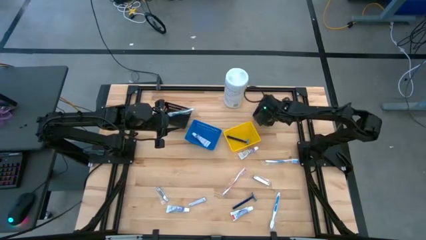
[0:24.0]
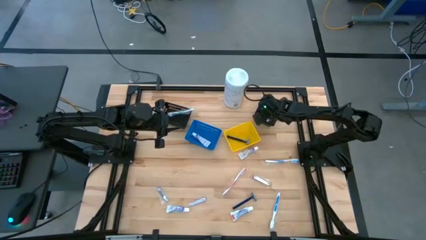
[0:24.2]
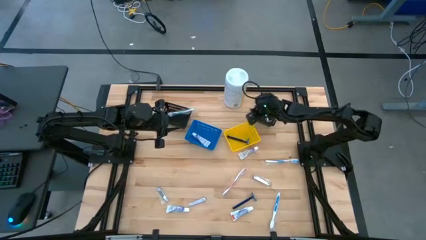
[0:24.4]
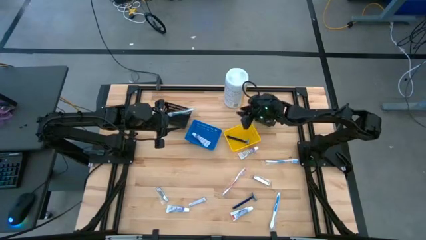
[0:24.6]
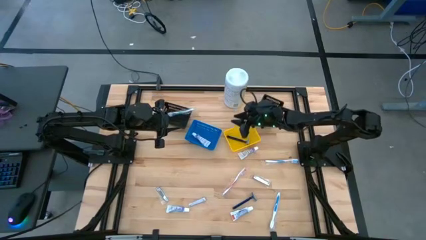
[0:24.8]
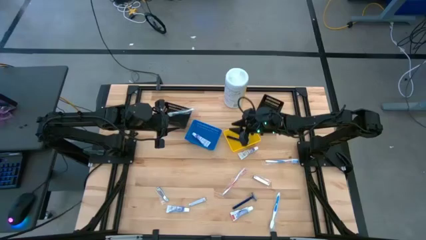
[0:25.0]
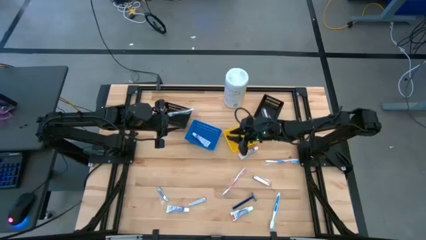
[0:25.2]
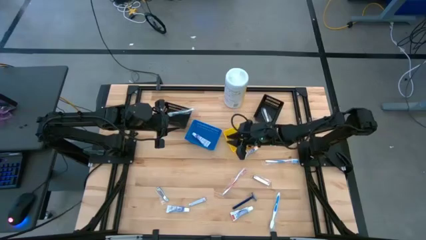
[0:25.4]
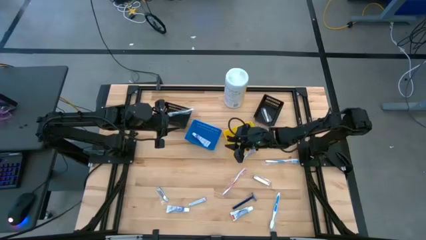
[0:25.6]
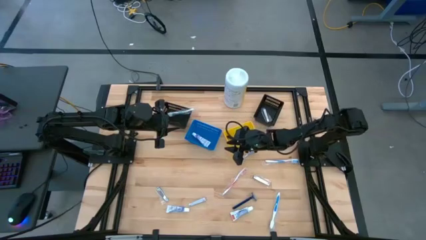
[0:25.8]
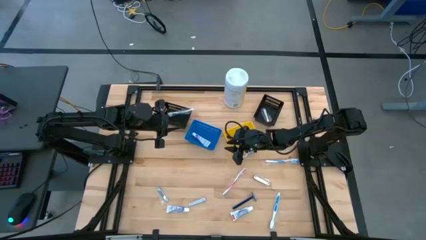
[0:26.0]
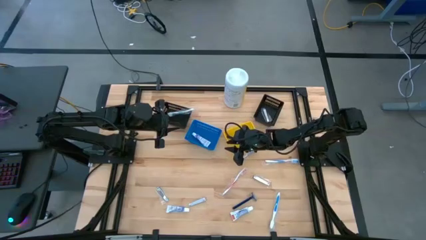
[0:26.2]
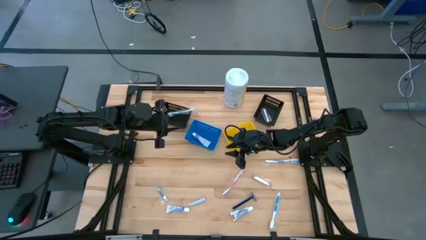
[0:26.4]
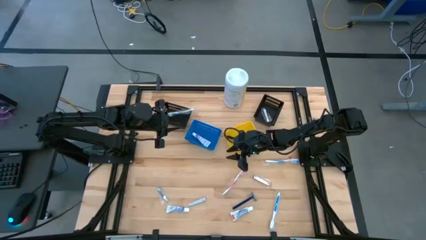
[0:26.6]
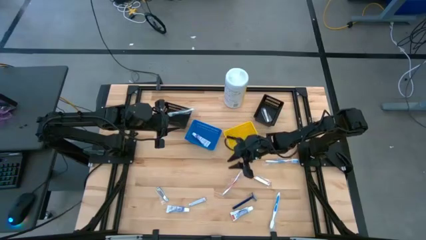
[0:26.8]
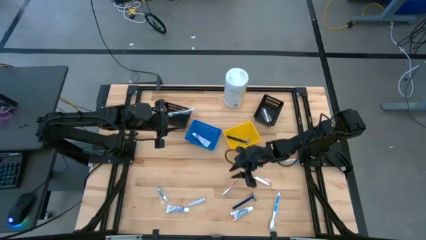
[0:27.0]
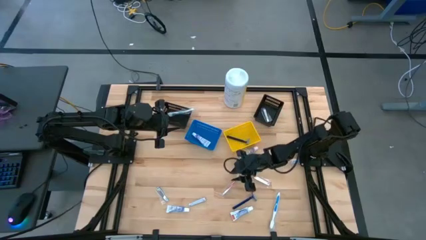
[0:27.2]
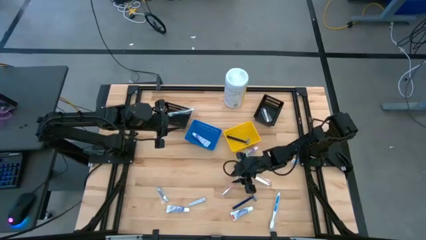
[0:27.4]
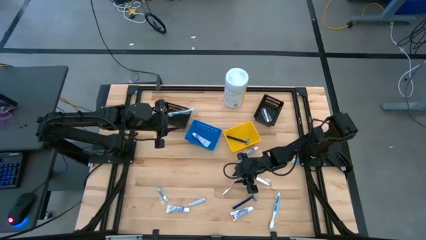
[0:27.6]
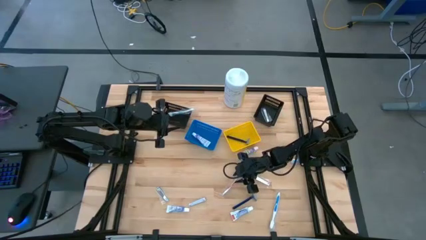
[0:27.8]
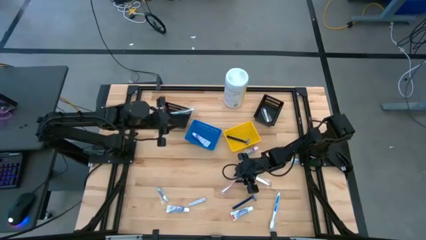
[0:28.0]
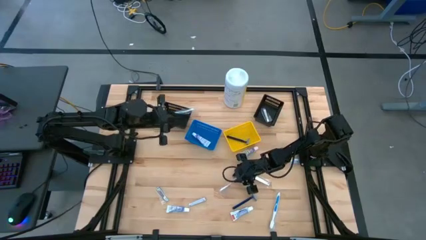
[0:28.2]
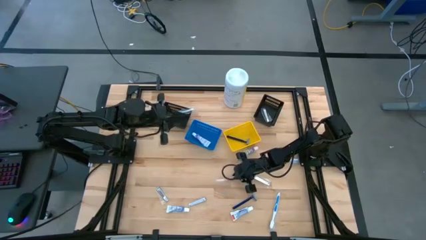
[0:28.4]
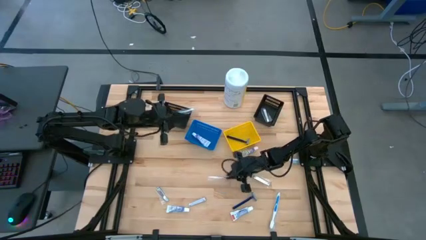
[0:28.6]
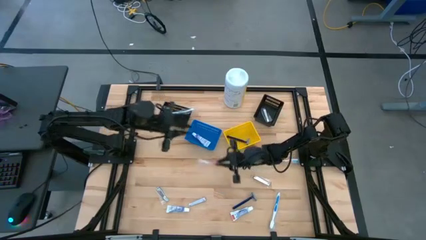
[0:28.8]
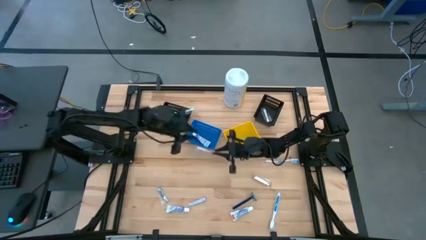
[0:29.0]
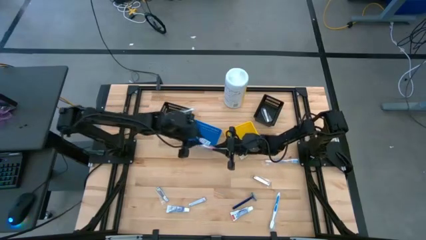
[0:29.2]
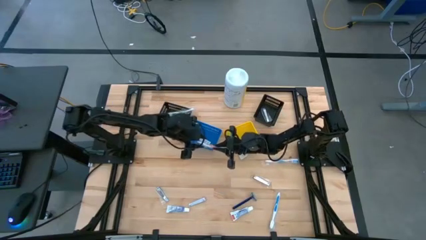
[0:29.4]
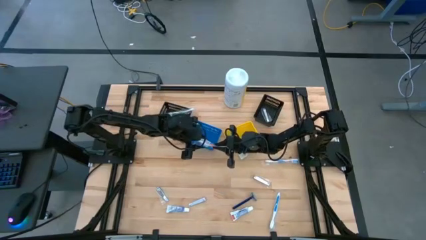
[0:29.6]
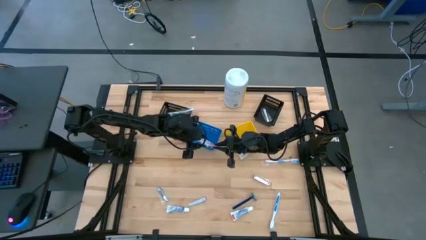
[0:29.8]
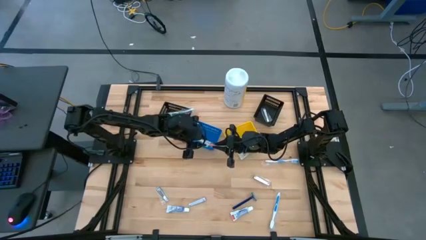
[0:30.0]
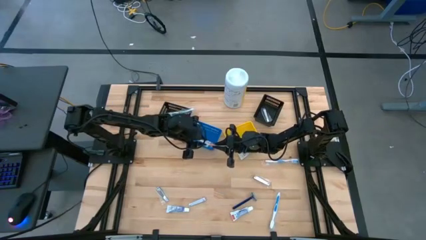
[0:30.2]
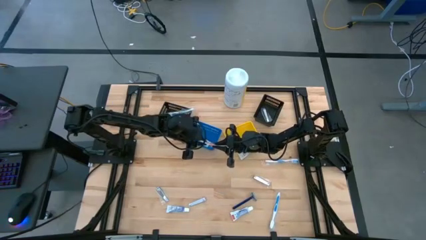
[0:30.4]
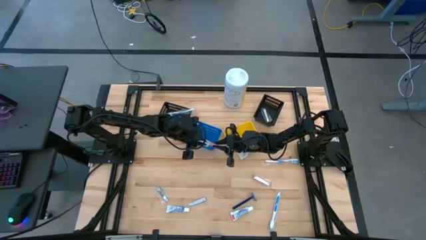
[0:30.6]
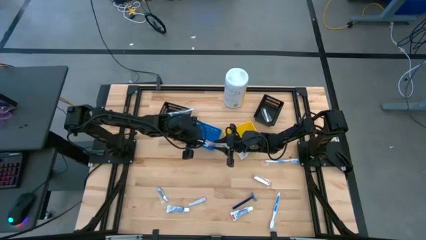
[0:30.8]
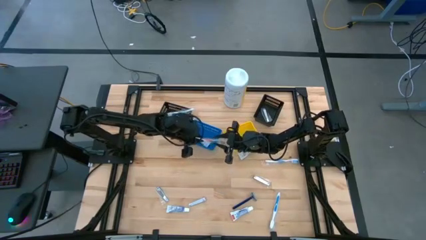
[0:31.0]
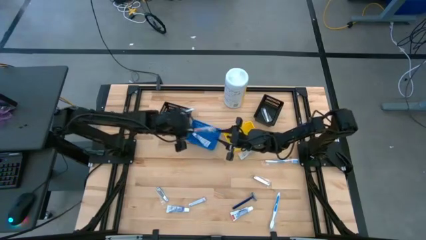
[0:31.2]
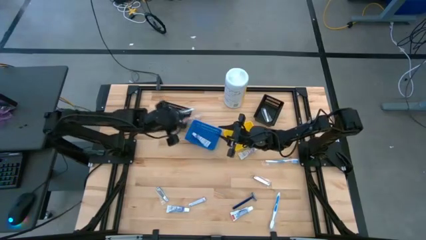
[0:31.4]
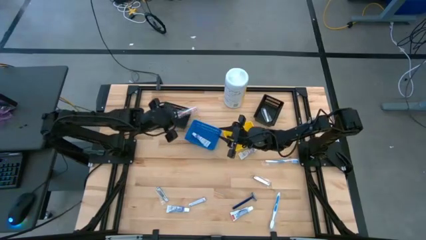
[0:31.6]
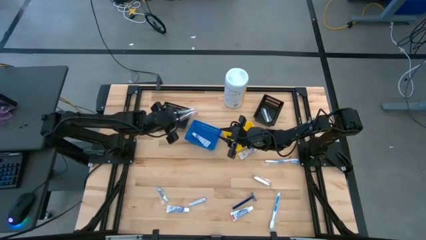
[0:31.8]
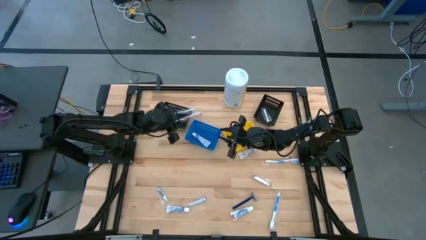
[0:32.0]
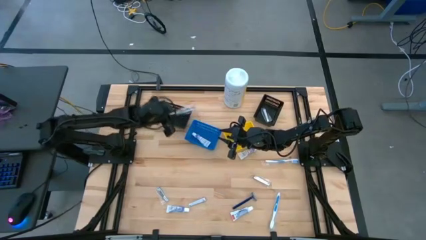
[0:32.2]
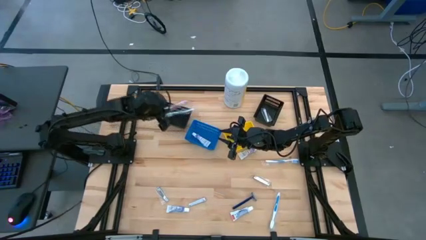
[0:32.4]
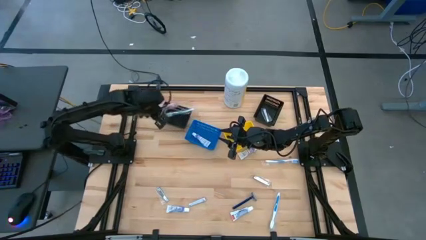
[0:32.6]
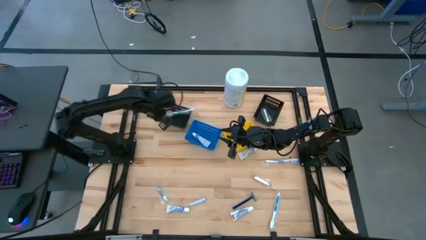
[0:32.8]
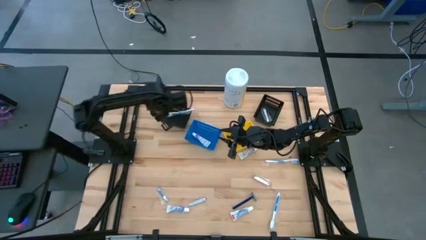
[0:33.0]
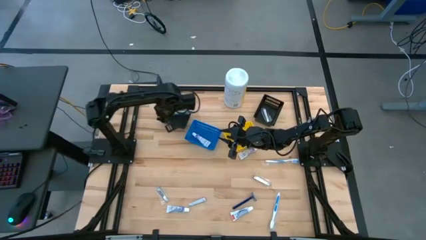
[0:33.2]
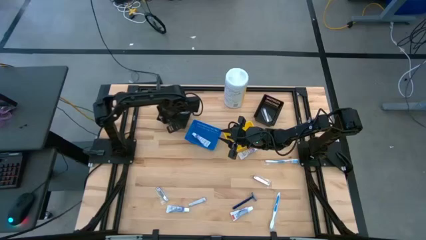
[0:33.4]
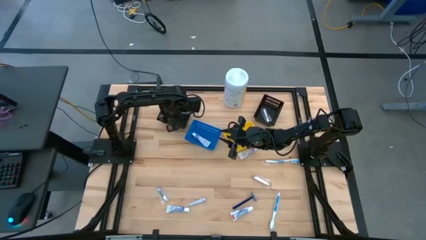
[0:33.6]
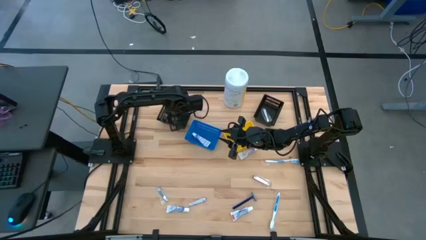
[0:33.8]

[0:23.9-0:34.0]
Task: Pick & Place Travel size toiletries
Put the orange toothbrush into the left black bin

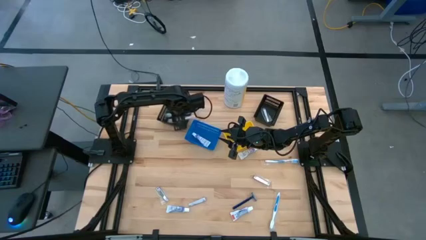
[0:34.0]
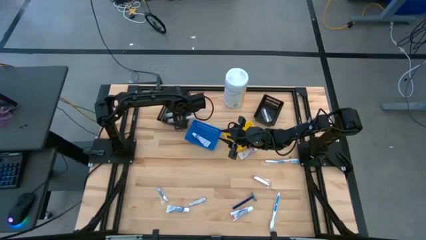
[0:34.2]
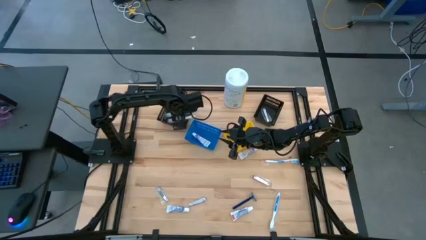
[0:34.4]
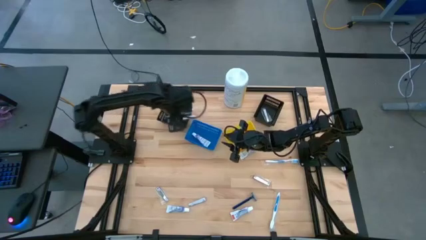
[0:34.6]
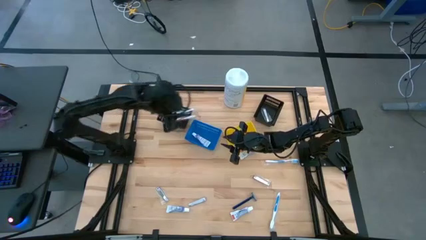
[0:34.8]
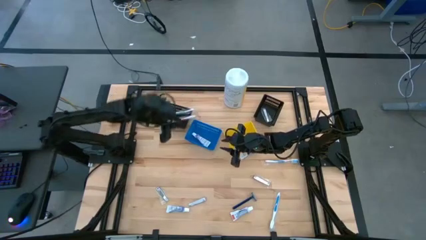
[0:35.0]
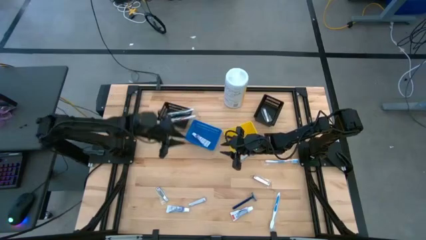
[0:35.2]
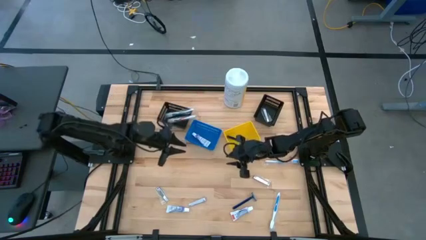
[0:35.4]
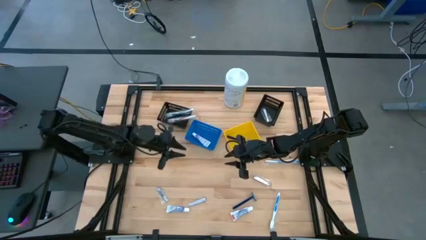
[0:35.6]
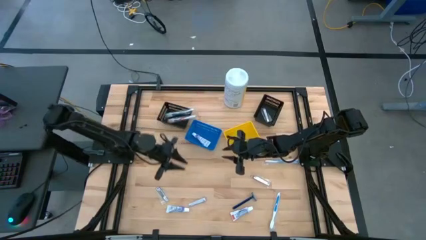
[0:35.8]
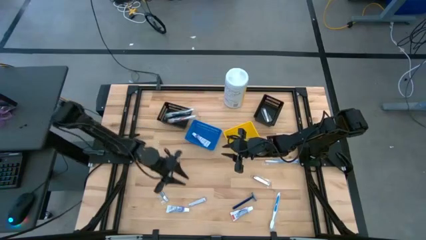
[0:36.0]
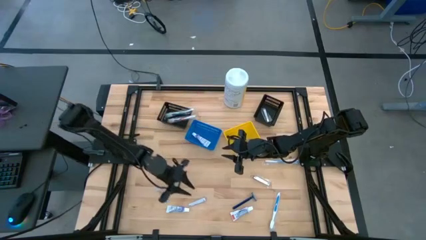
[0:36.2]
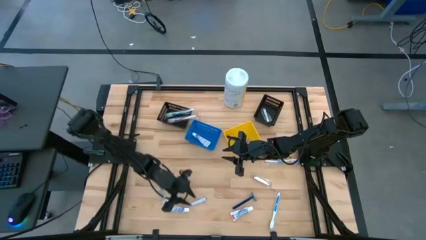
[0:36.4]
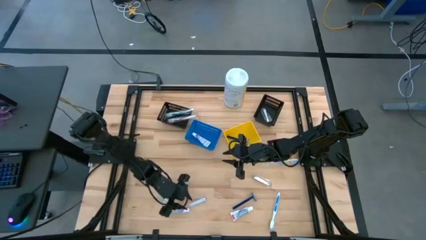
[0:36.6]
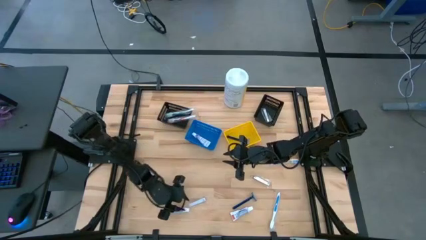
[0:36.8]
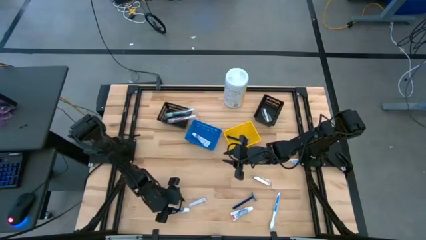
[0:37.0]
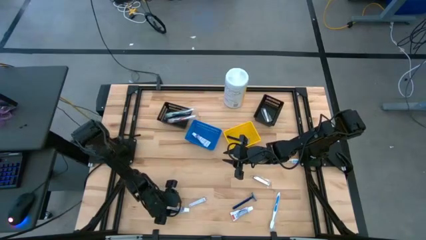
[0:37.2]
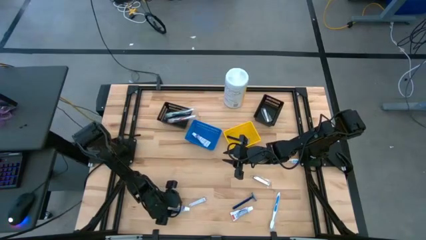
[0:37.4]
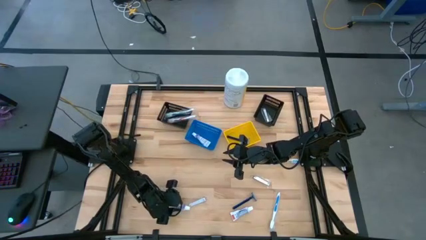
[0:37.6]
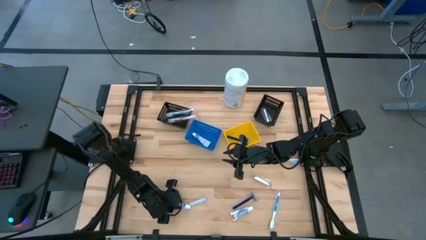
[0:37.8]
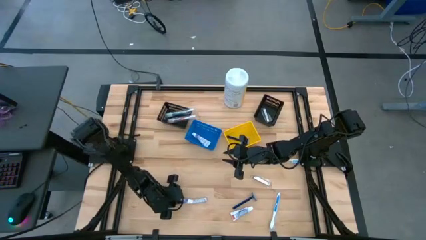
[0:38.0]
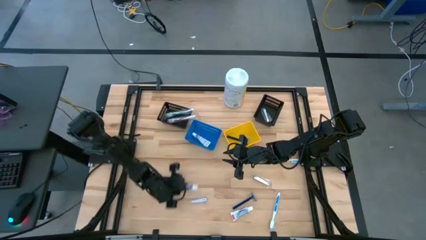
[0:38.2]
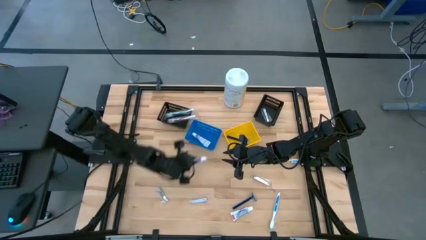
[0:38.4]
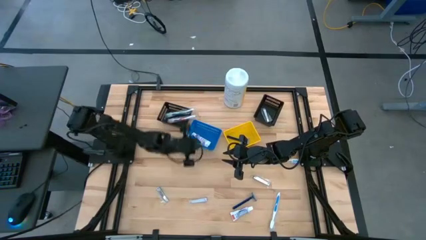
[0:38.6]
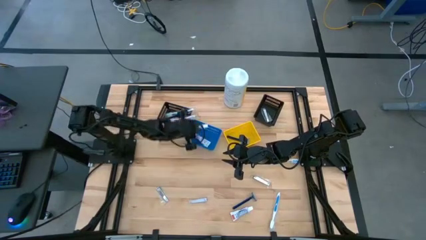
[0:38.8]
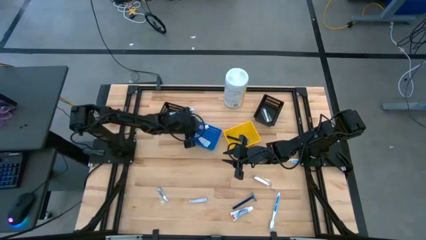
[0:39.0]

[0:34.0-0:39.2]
Put the white toothpaste into the blue bin

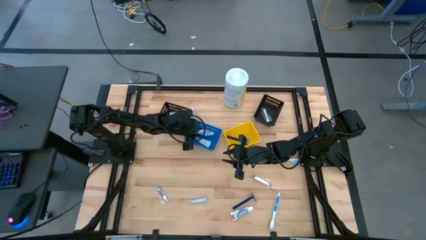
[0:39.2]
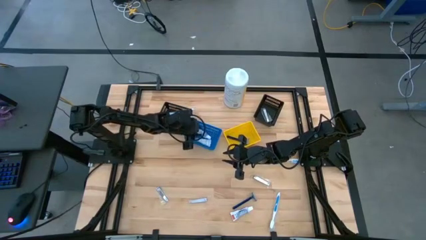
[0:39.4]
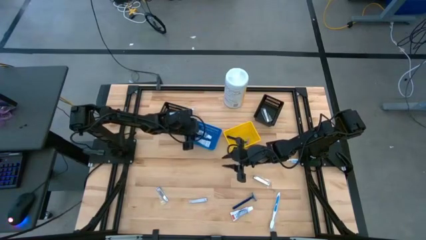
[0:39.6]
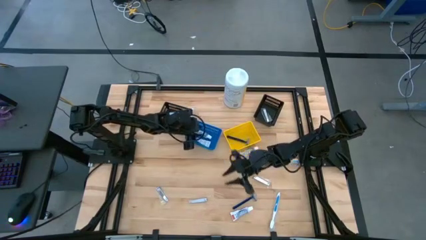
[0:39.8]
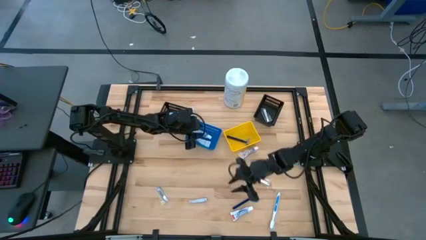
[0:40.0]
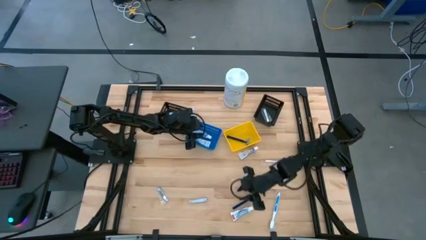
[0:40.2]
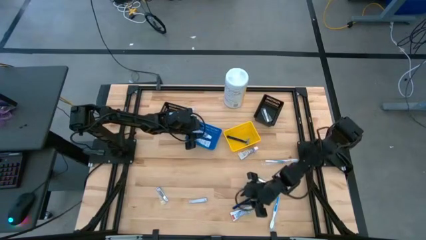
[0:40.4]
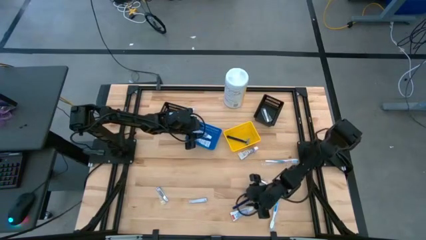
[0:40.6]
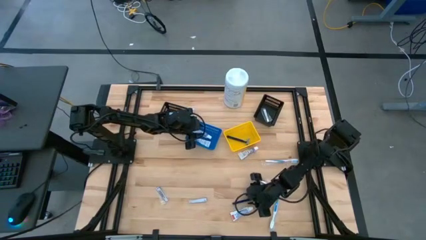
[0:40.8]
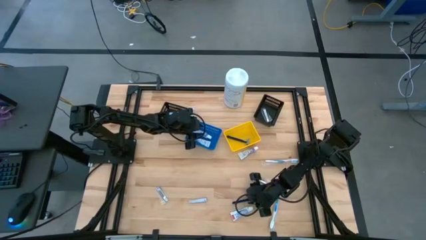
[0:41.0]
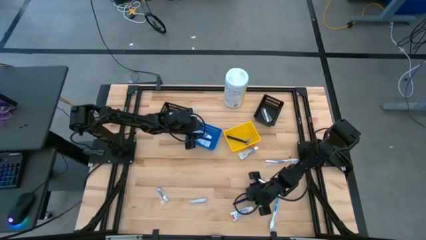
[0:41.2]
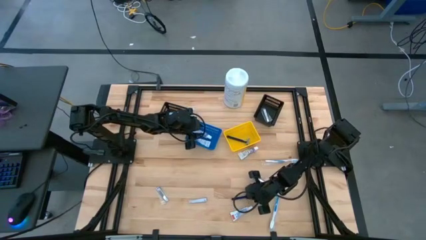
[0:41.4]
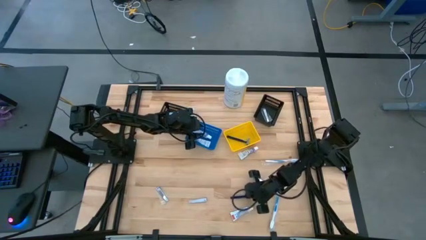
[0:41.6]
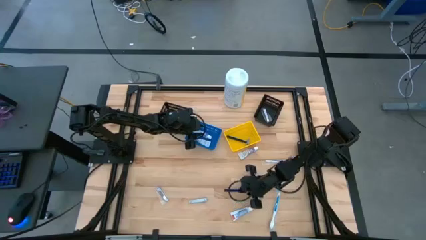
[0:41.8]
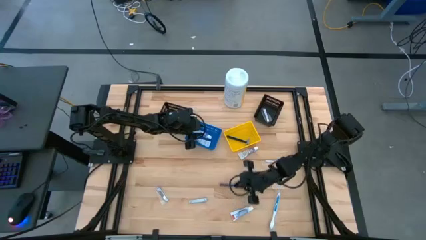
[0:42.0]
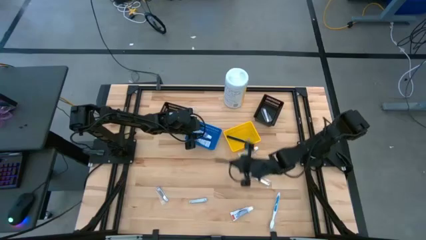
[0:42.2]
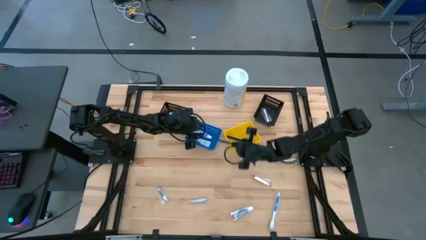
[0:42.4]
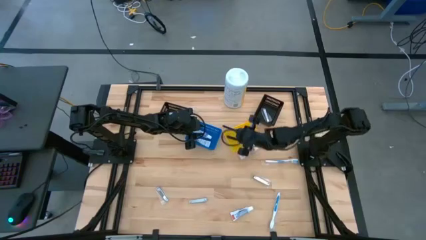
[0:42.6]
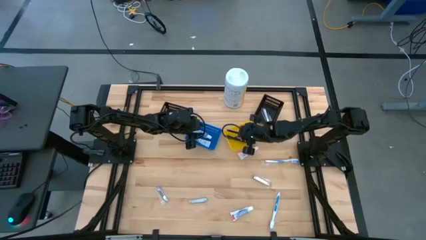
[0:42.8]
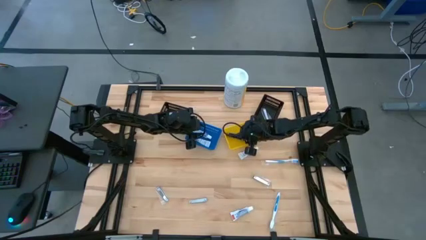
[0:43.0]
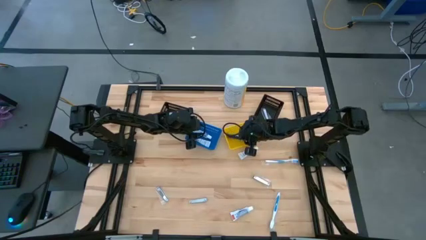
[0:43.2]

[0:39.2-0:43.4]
Put the blue razor into the yellow bin
